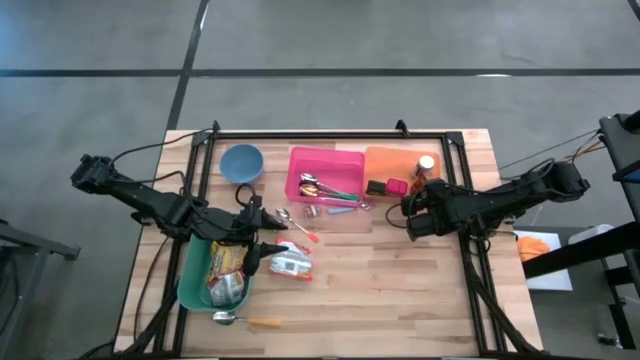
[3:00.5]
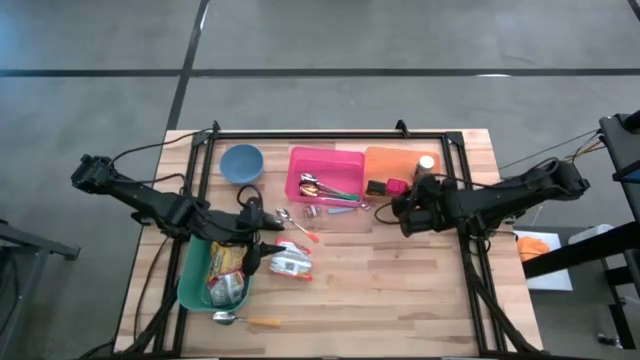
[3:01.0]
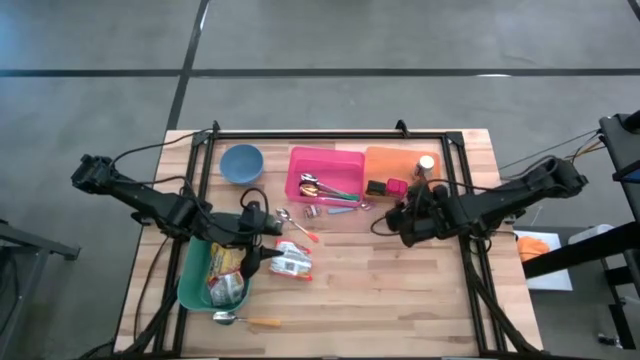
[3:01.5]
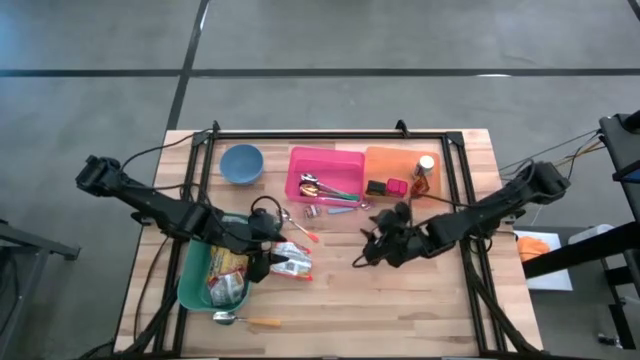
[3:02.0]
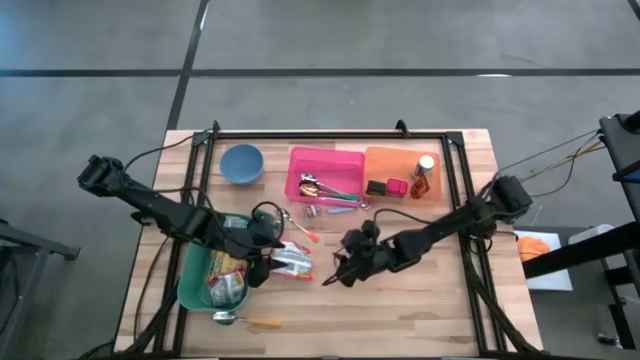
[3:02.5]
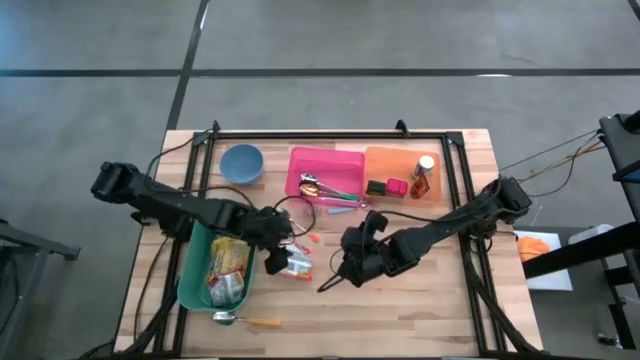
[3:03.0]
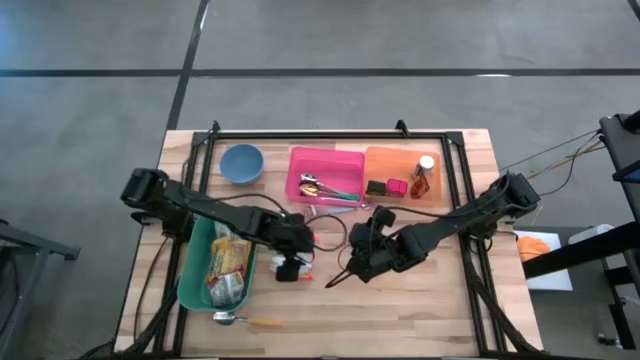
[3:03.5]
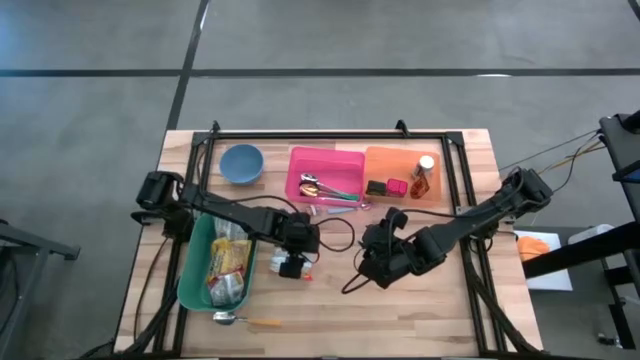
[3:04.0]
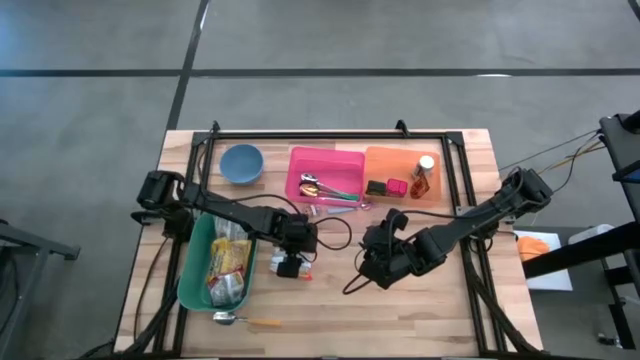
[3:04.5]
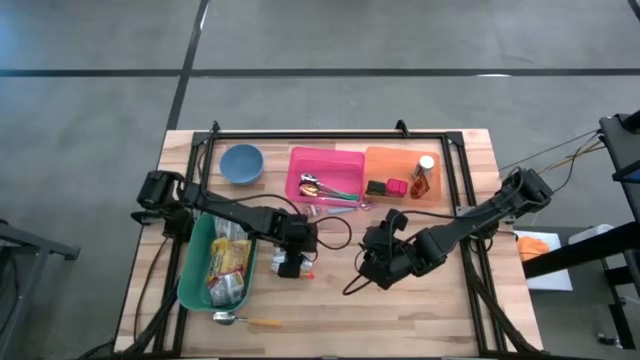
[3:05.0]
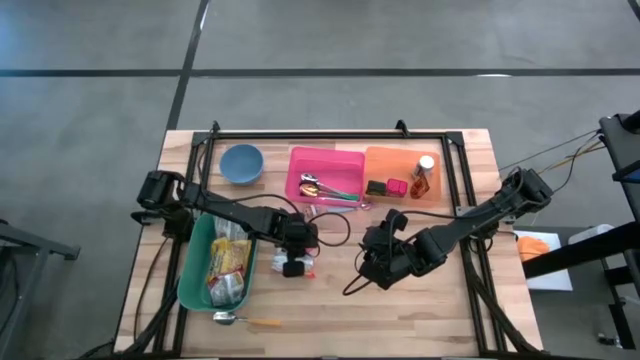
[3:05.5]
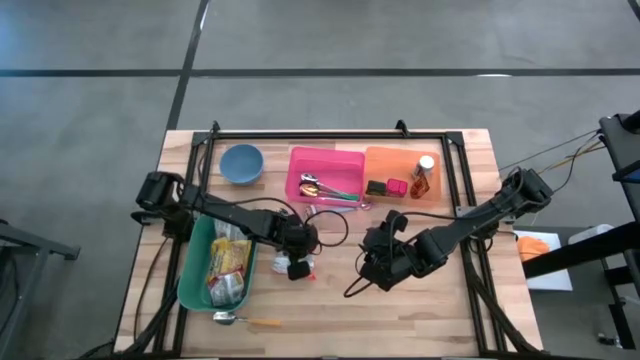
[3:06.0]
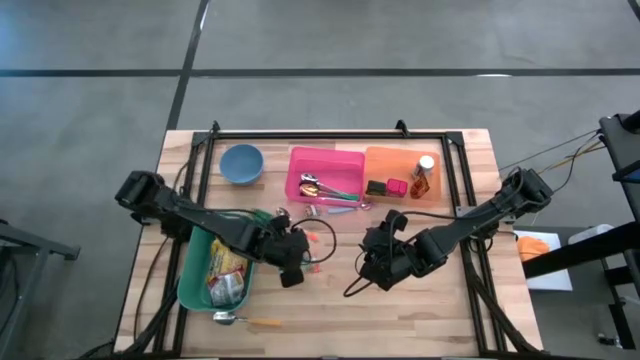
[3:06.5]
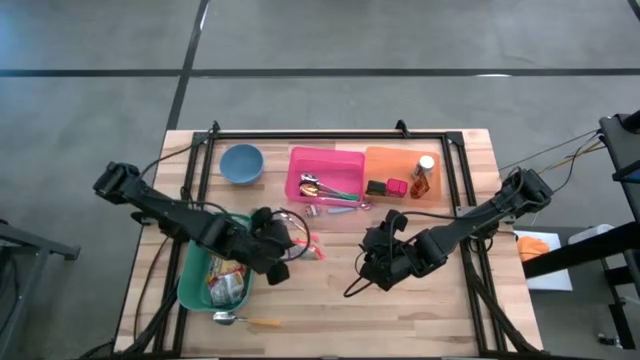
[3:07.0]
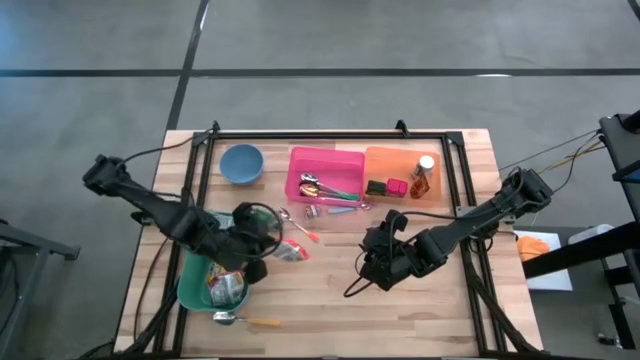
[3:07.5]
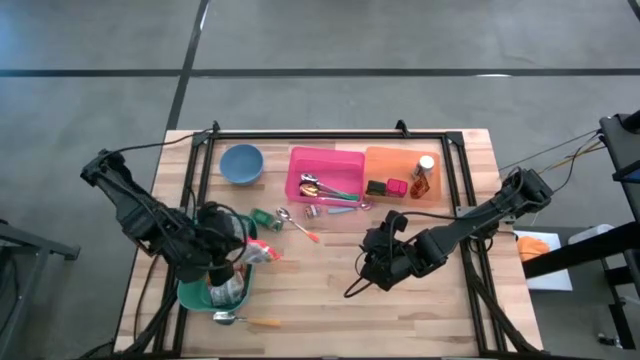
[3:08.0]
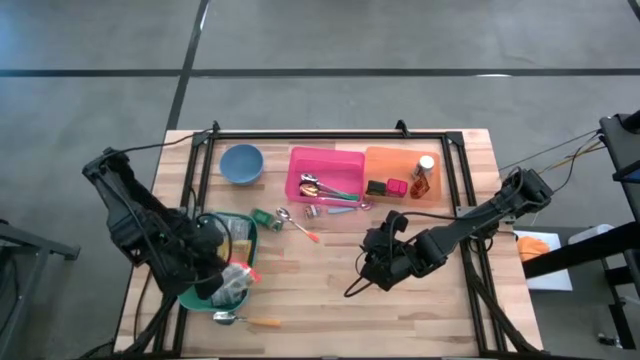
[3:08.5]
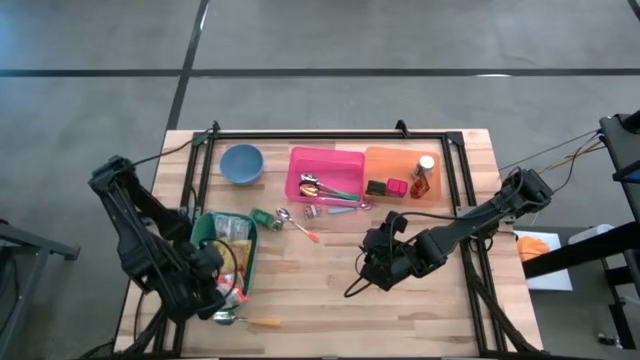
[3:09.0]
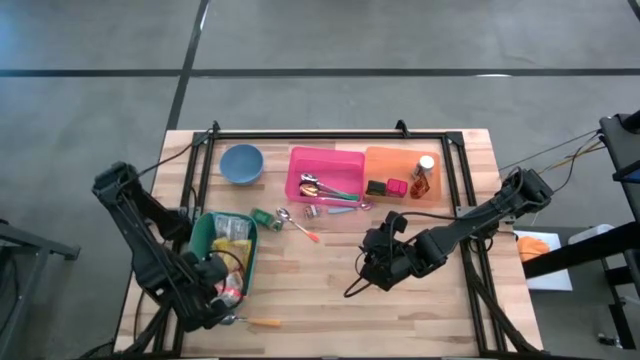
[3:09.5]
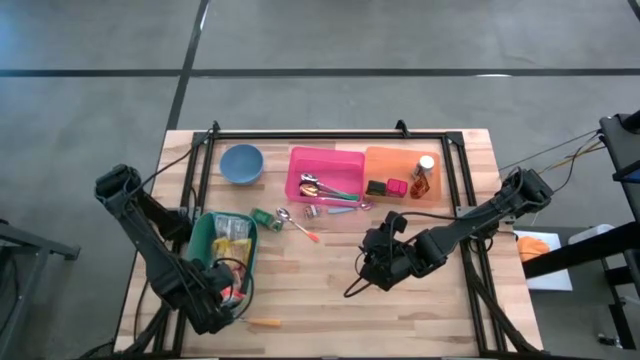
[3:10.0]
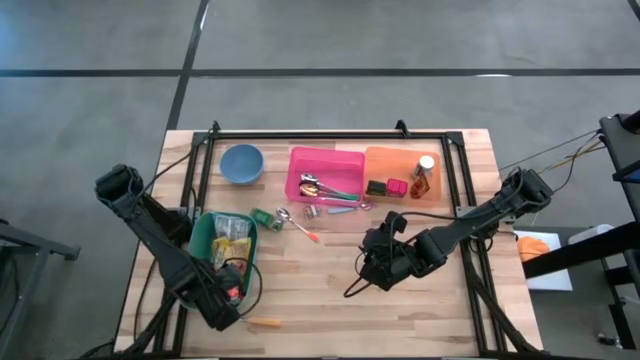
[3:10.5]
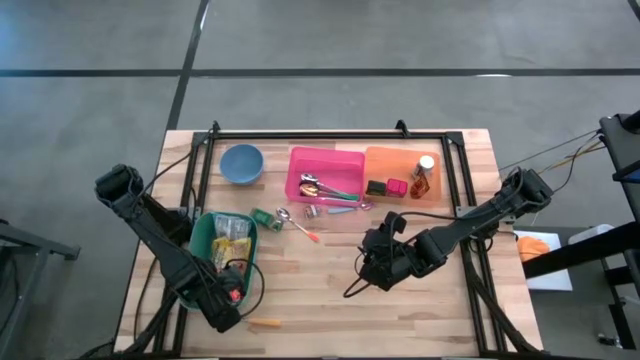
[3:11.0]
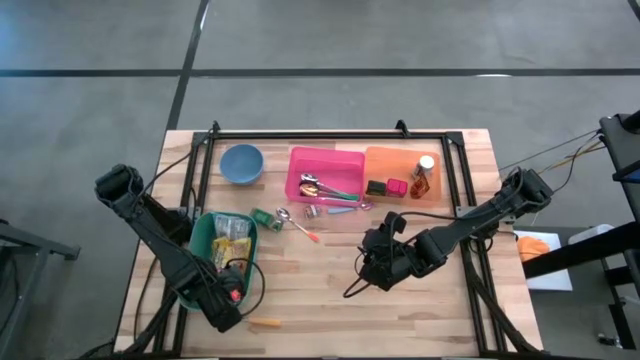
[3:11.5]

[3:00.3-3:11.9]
Put the orange noodle pack into the green bin

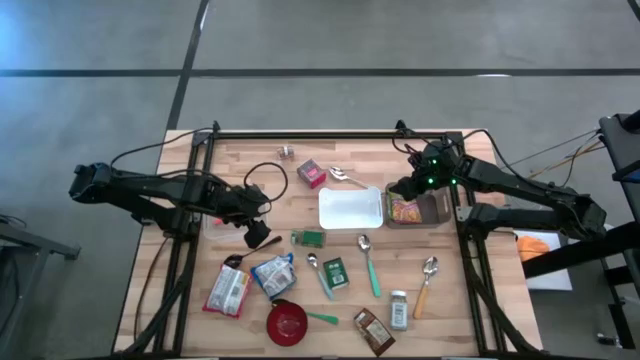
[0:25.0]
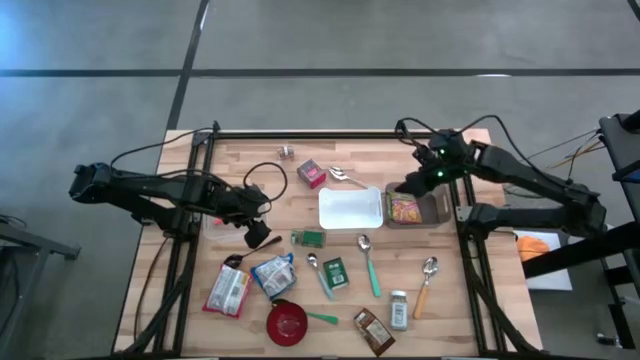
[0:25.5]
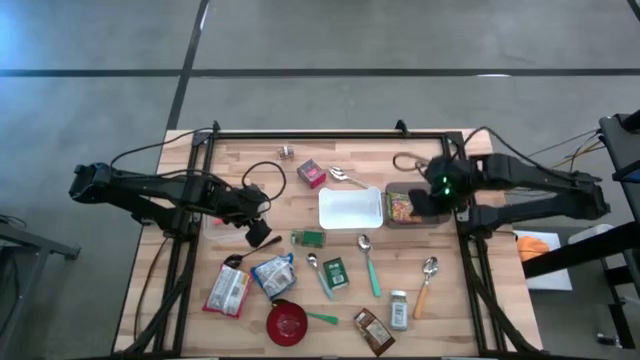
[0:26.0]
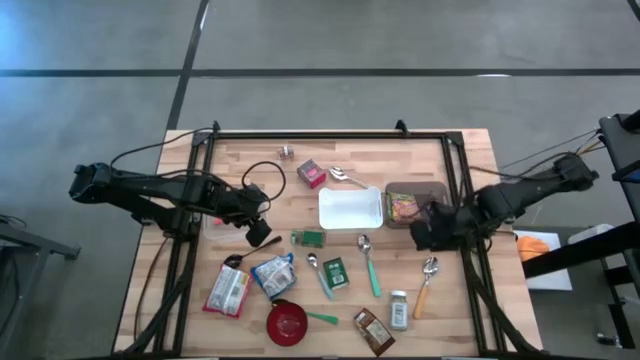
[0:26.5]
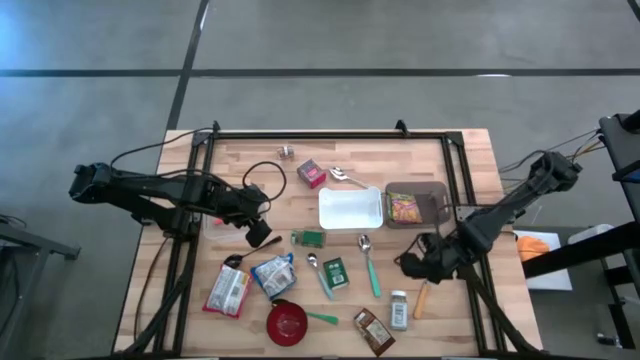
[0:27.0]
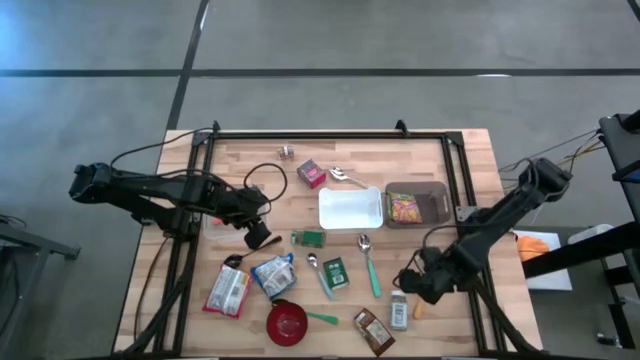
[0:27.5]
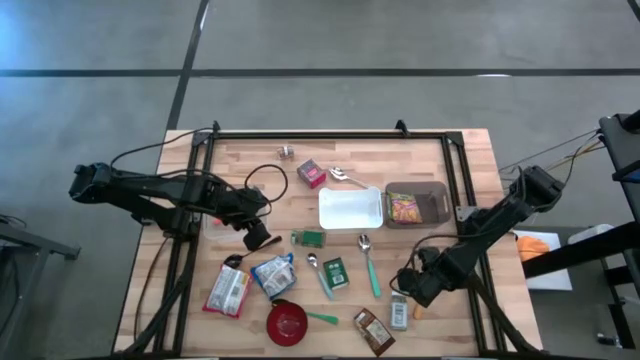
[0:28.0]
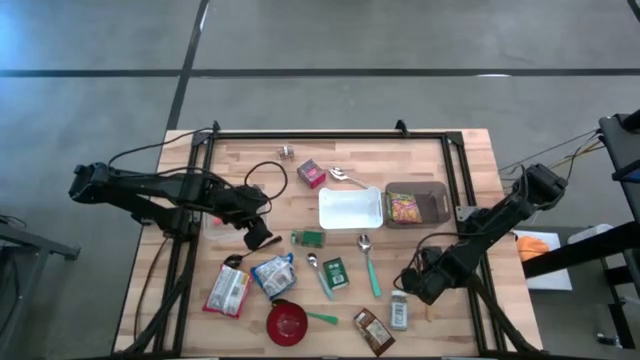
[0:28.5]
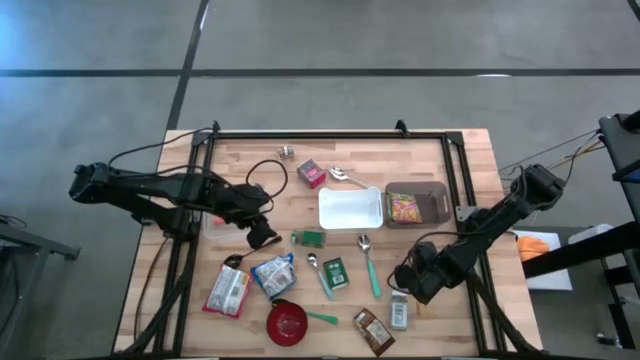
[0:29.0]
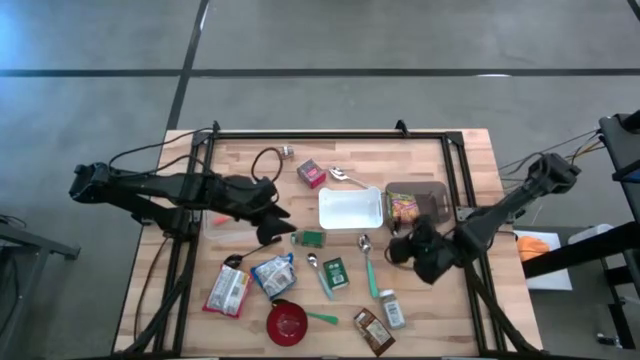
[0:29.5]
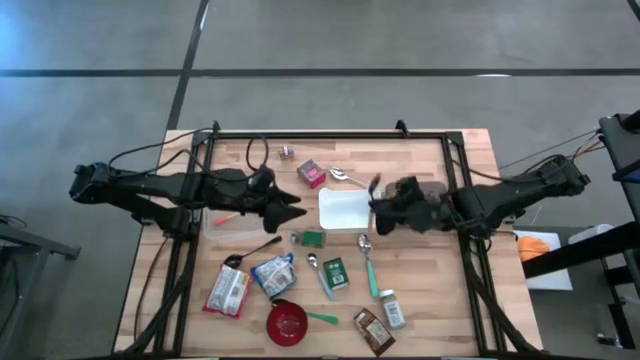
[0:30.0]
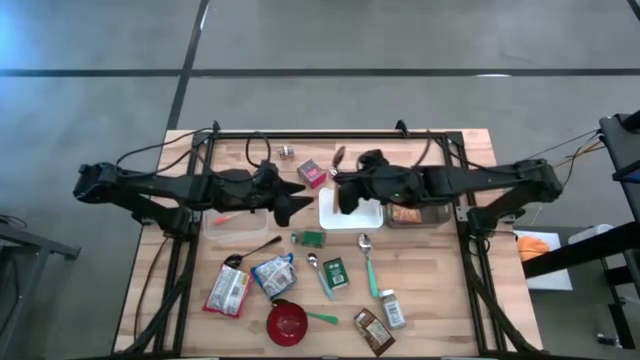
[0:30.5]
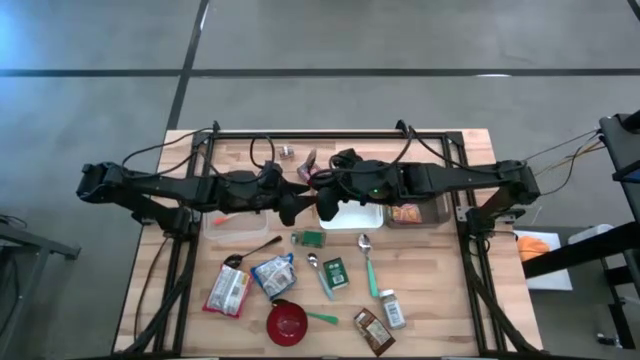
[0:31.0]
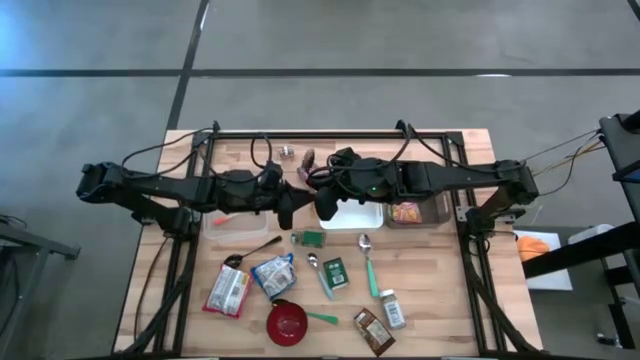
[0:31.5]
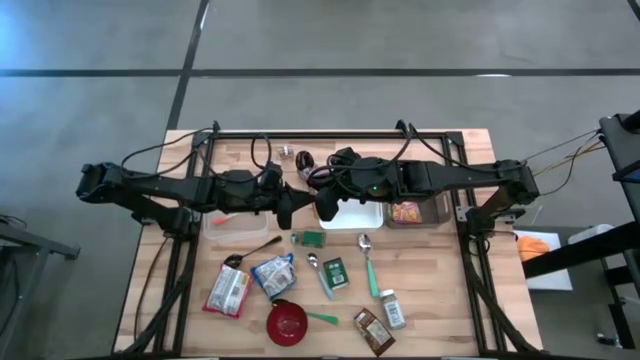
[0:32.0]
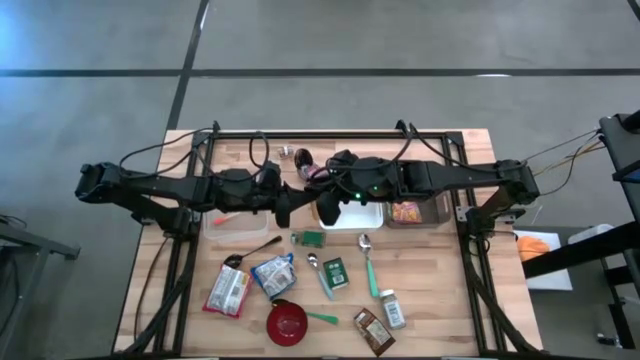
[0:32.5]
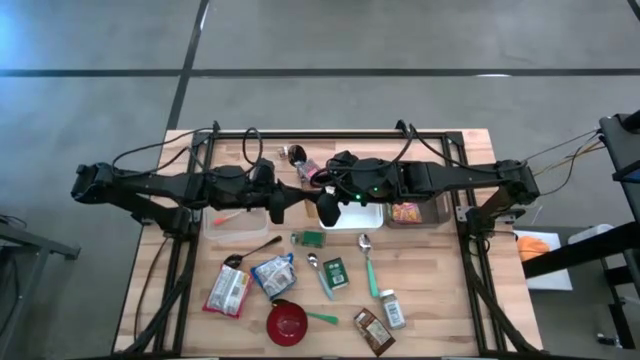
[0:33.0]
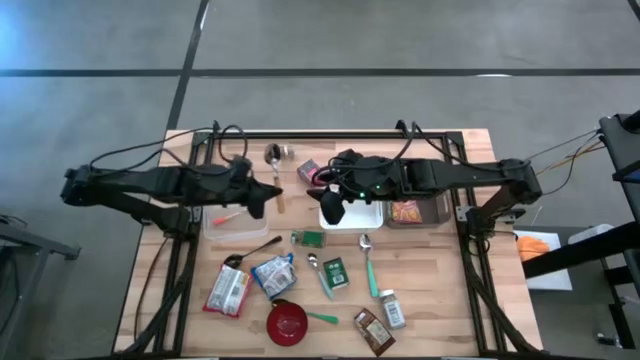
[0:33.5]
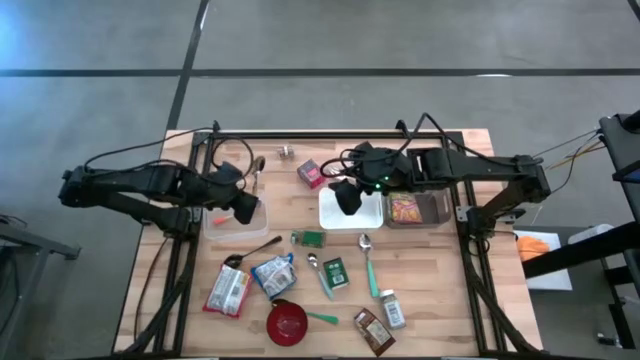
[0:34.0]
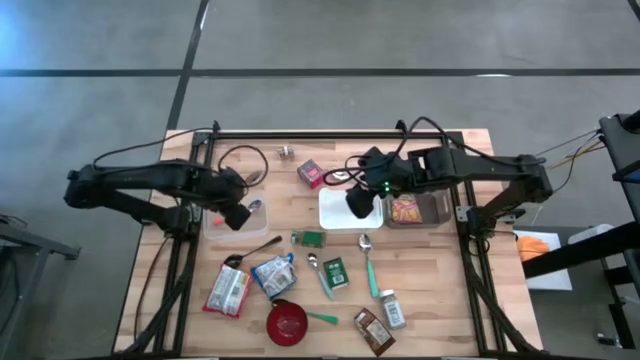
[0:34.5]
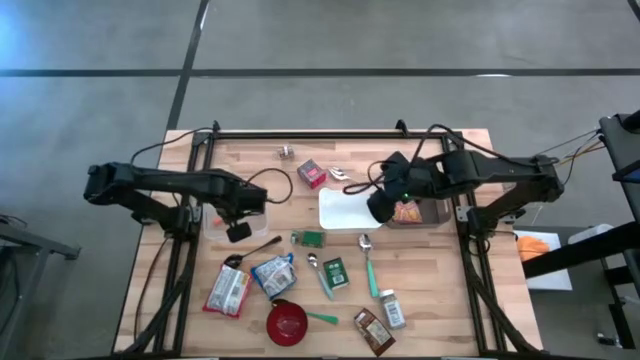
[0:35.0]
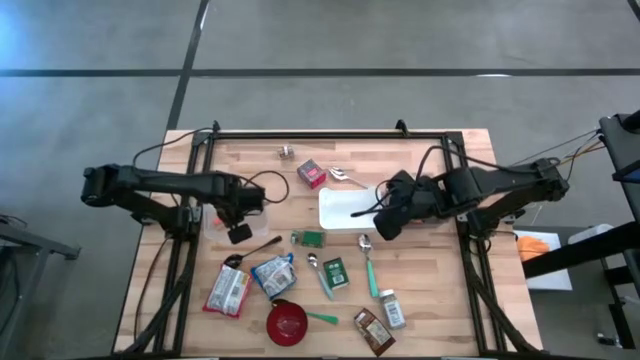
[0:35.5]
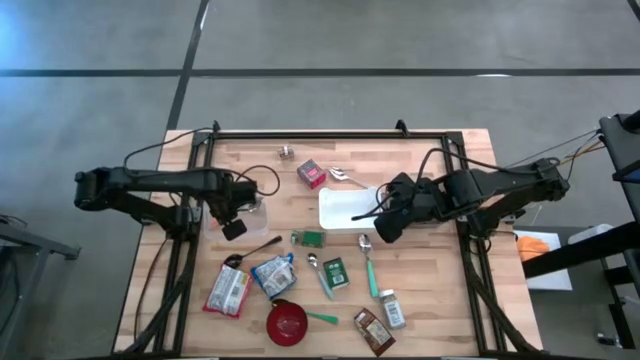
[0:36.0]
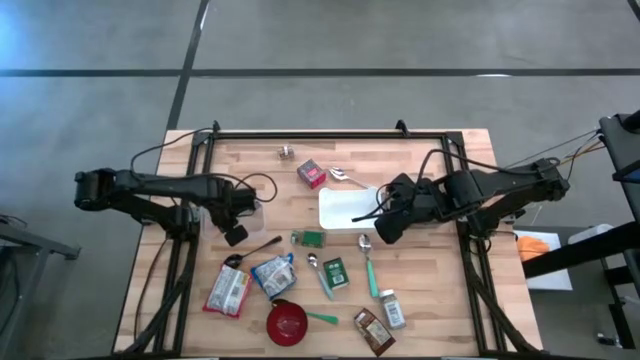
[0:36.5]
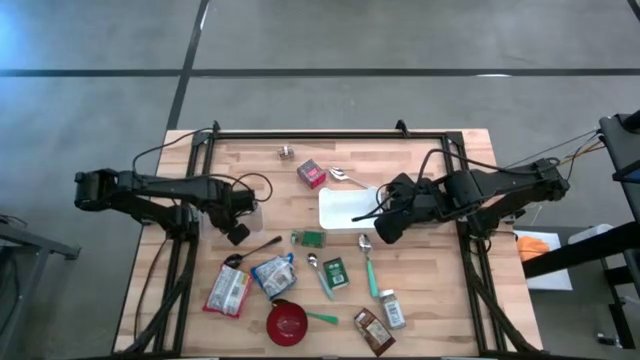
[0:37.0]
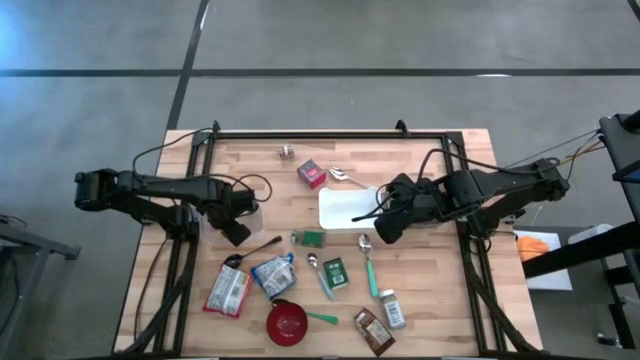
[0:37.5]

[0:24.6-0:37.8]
Put the yellow spoon into the transparent bin
